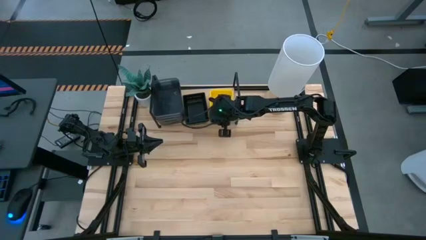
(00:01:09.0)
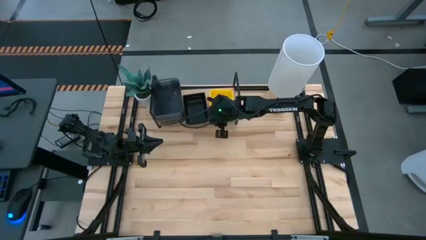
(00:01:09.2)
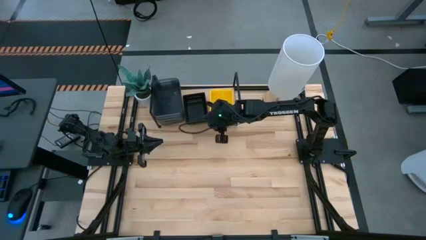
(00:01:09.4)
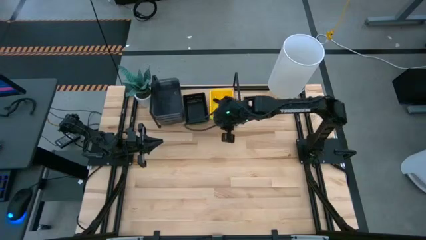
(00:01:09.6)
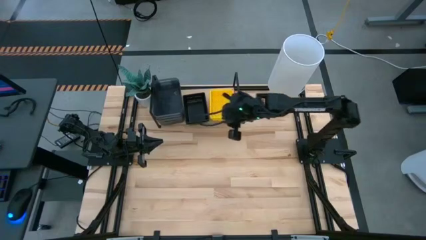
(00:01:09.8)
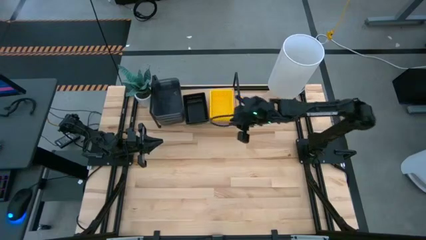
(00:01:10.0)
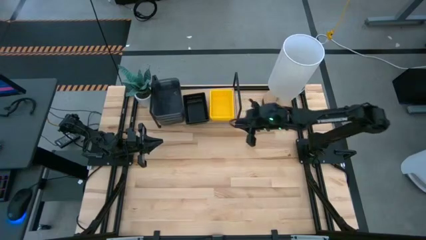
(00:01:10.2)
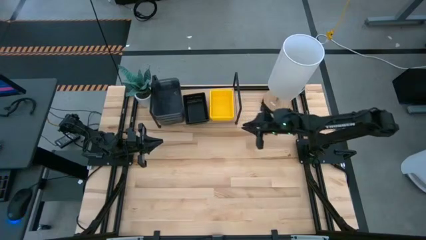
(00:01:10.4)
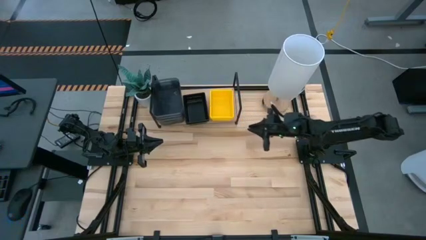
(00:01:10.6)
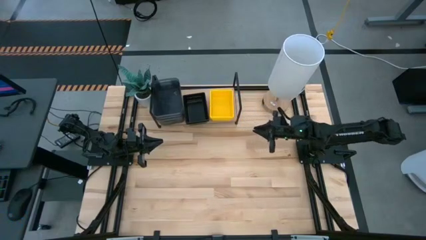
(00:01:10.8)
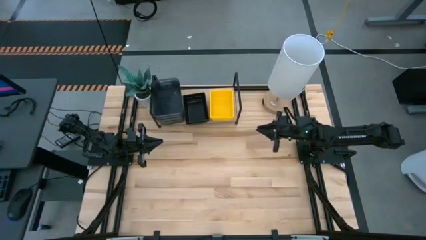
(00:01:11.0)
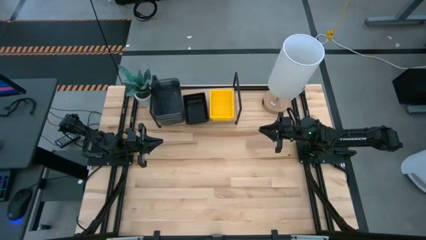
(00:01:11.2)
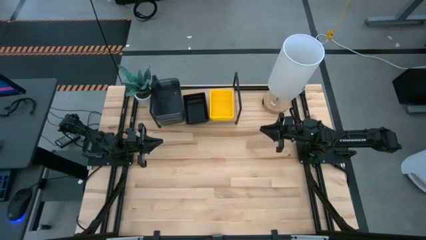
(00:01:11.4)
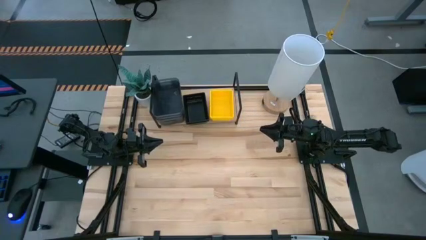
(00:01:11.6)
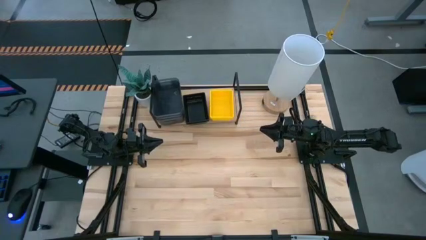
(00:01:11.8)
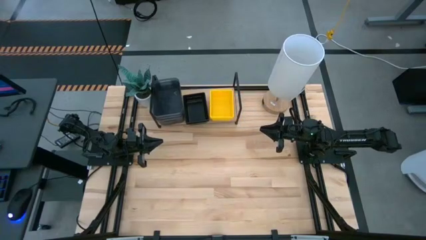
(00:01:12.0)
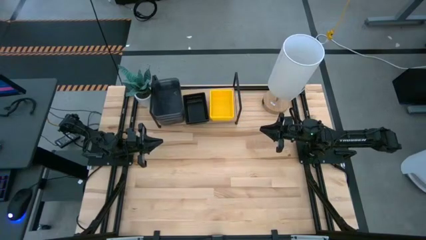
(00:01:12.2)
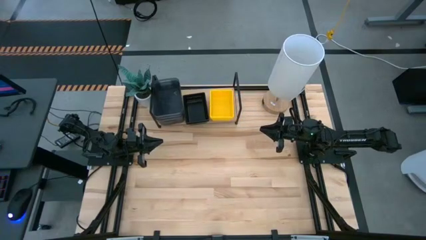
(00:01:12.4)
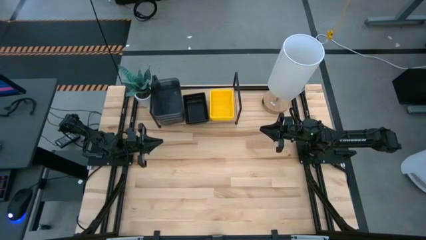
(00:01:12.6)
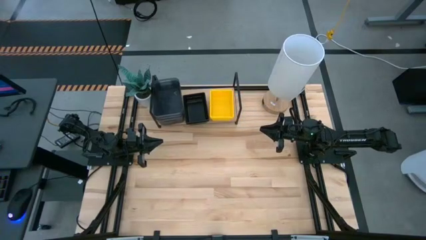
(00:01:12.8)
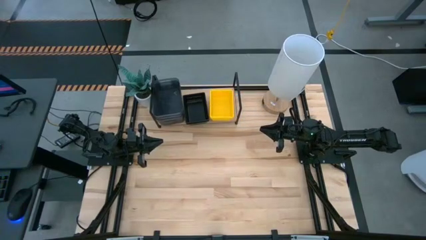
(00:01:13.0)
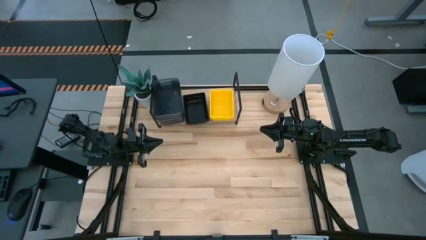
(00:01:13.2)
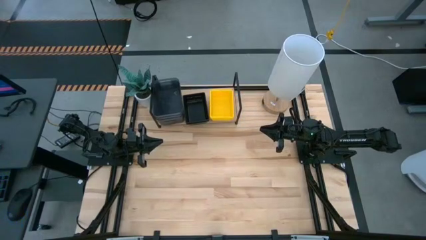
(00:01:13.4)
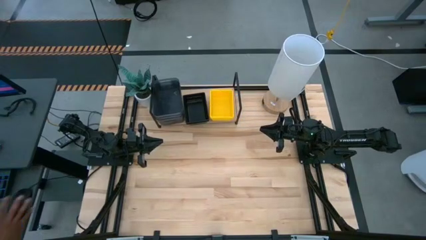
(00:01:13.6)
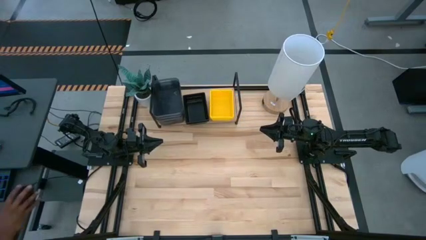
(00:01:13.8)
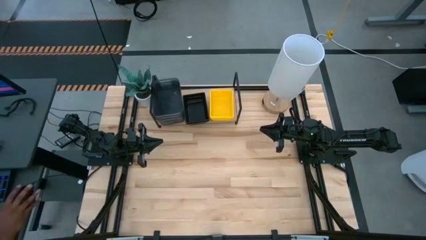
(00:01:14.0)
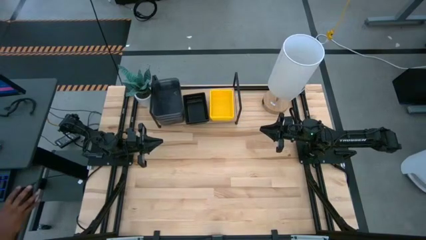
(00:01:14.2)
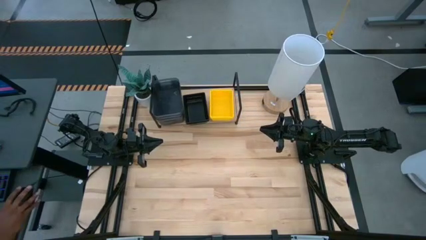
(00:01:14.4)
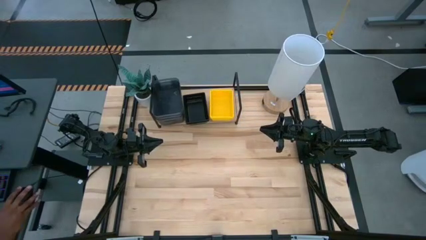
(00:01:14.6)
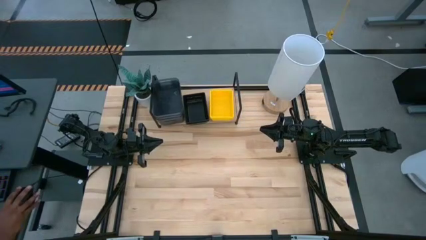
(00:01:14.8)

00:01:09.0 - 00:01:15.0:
Task: Stack baskets on shelf by color
Return to Home Position

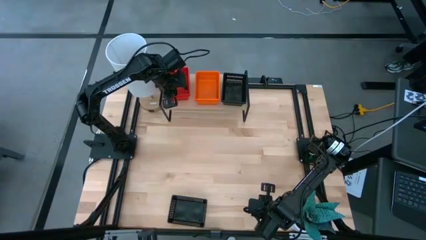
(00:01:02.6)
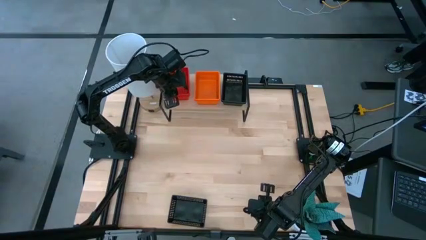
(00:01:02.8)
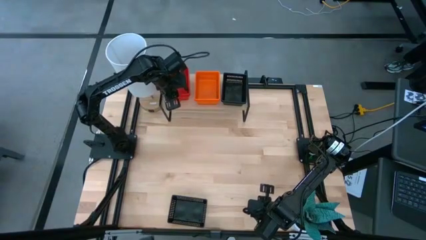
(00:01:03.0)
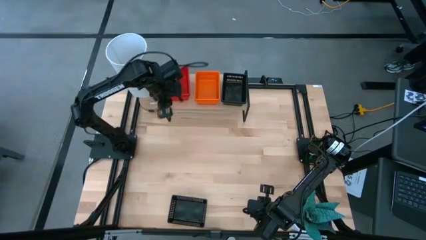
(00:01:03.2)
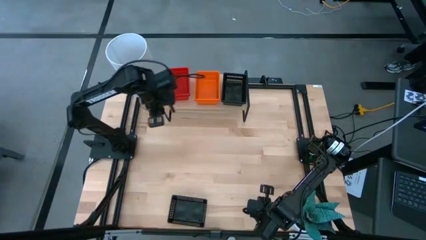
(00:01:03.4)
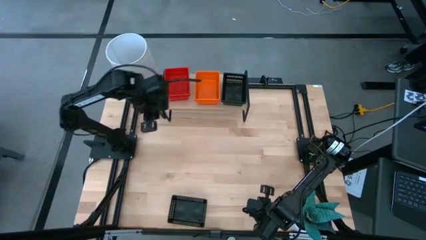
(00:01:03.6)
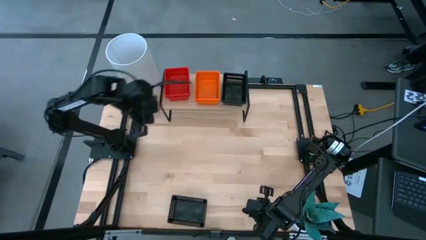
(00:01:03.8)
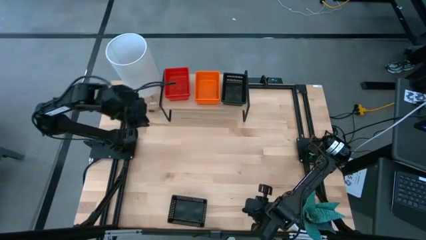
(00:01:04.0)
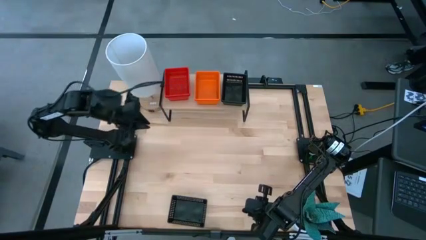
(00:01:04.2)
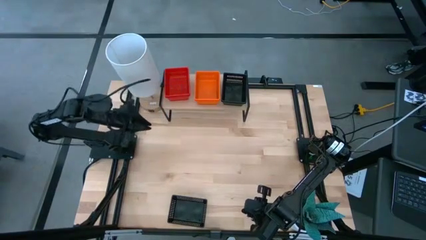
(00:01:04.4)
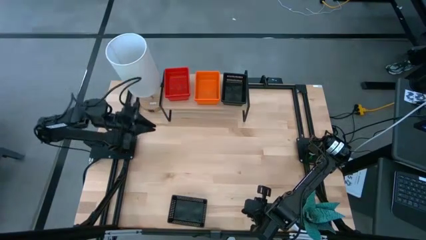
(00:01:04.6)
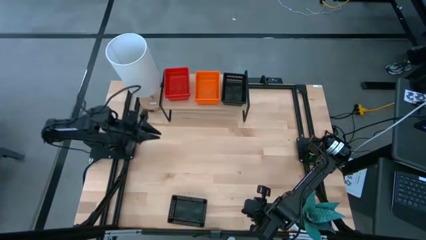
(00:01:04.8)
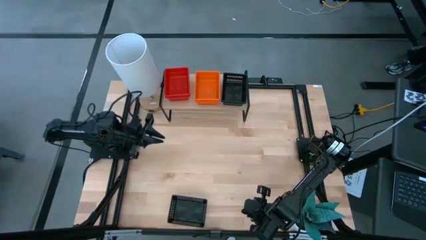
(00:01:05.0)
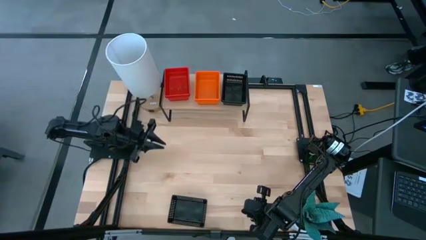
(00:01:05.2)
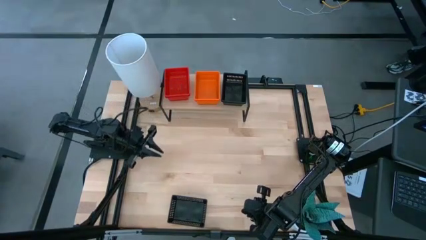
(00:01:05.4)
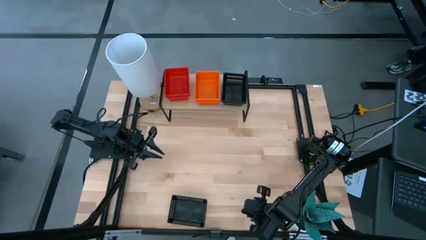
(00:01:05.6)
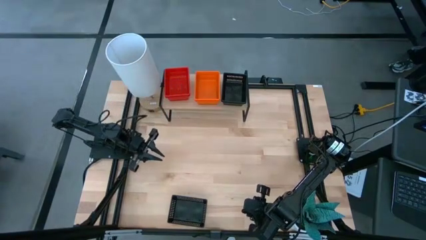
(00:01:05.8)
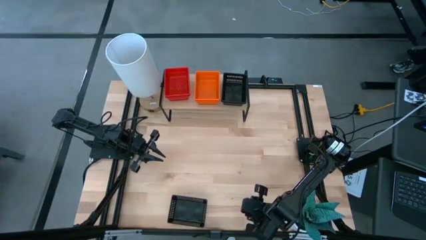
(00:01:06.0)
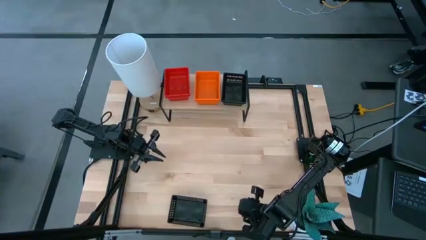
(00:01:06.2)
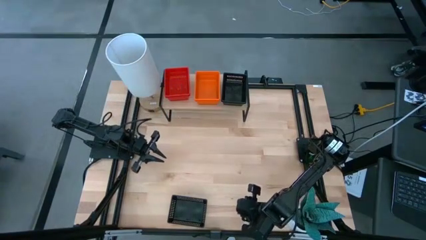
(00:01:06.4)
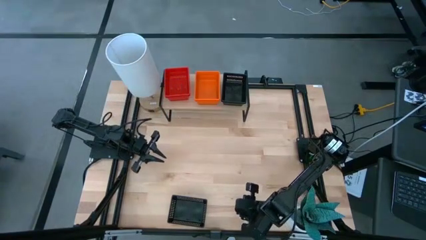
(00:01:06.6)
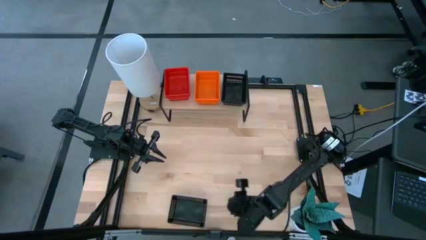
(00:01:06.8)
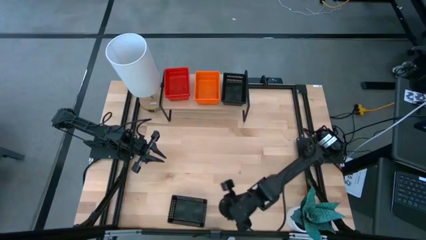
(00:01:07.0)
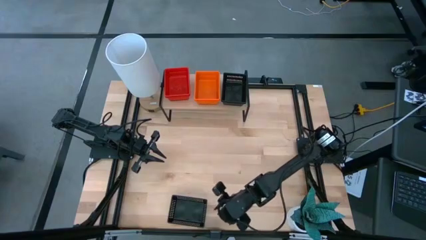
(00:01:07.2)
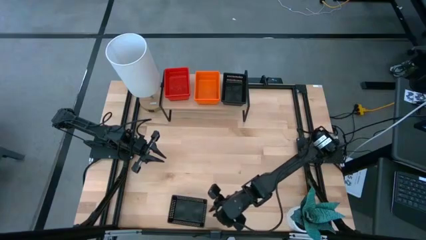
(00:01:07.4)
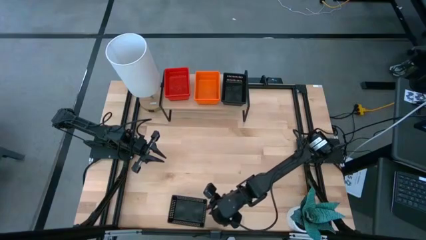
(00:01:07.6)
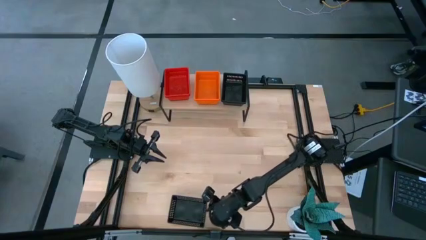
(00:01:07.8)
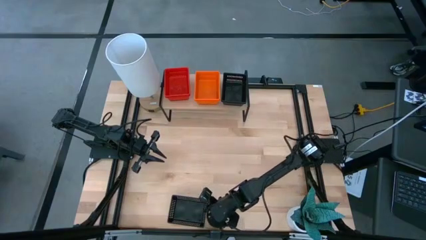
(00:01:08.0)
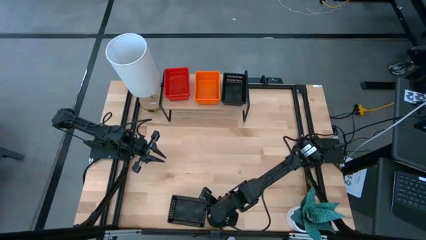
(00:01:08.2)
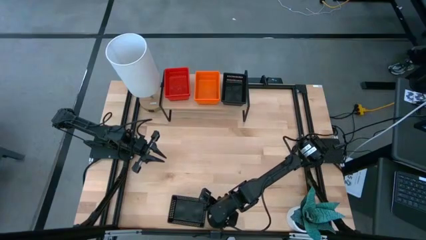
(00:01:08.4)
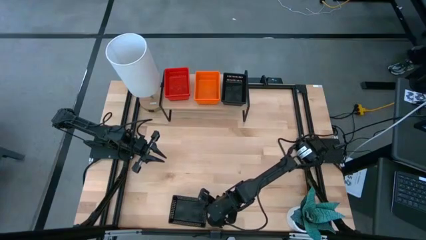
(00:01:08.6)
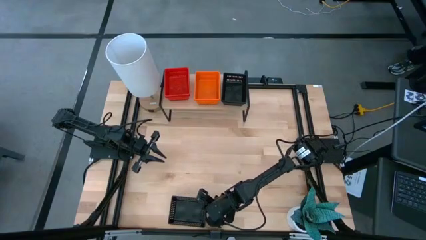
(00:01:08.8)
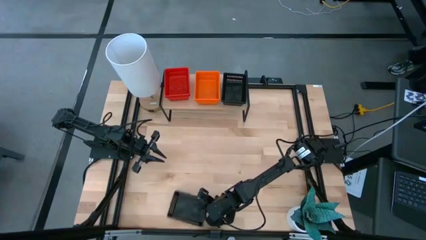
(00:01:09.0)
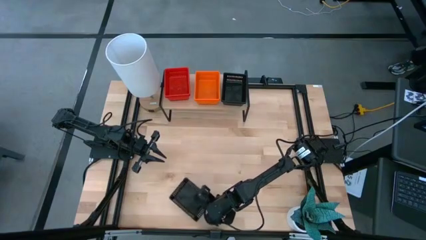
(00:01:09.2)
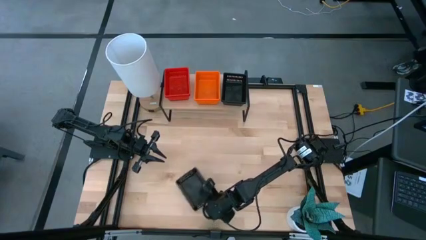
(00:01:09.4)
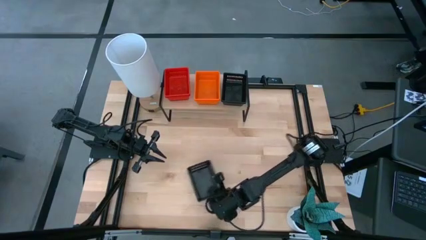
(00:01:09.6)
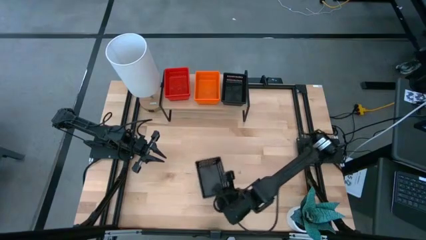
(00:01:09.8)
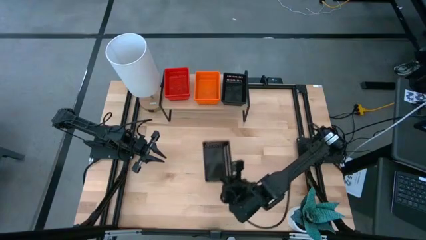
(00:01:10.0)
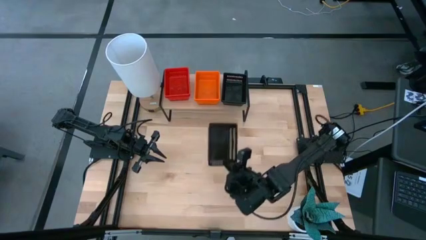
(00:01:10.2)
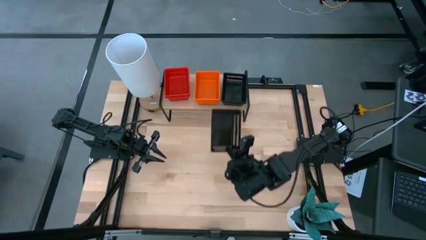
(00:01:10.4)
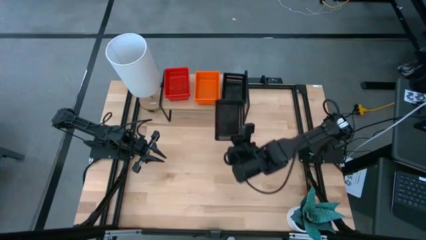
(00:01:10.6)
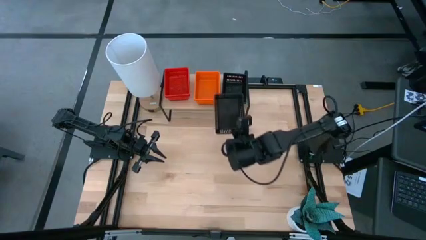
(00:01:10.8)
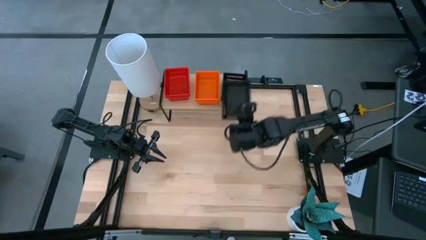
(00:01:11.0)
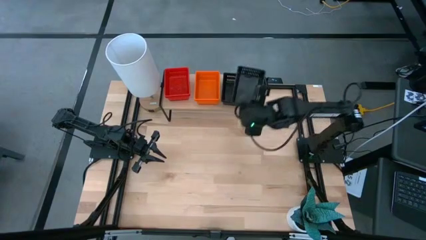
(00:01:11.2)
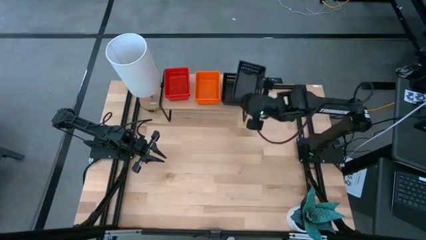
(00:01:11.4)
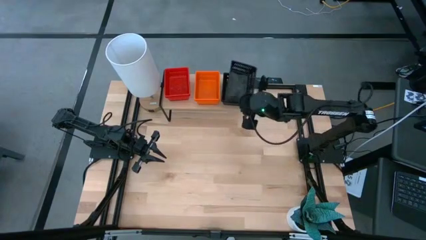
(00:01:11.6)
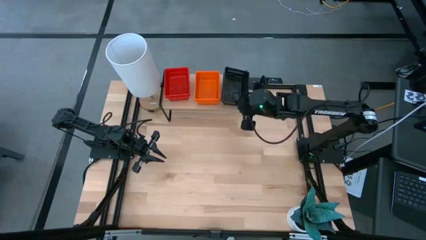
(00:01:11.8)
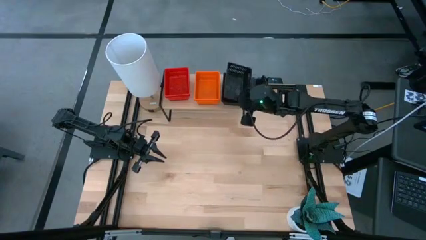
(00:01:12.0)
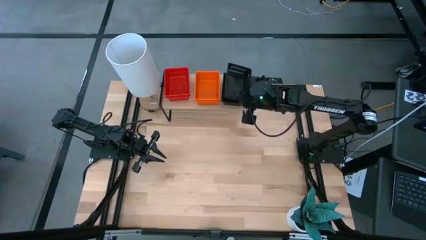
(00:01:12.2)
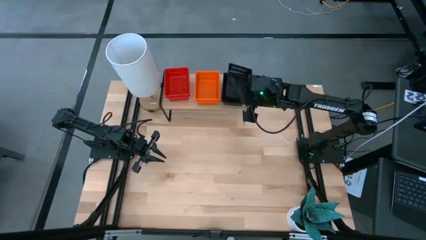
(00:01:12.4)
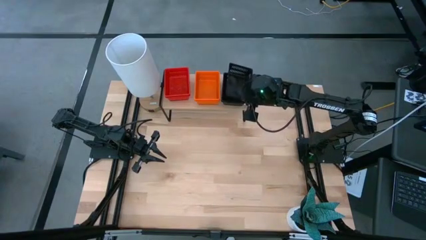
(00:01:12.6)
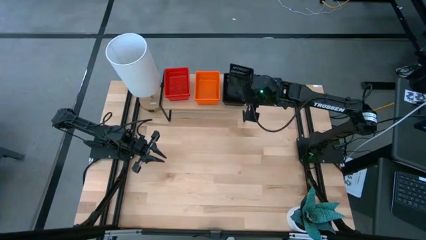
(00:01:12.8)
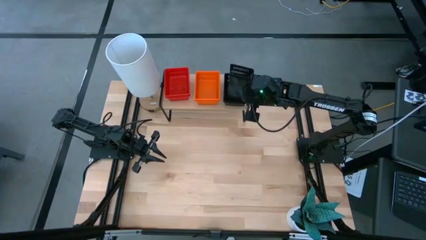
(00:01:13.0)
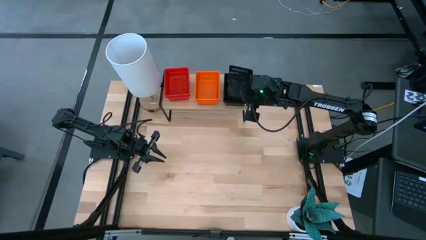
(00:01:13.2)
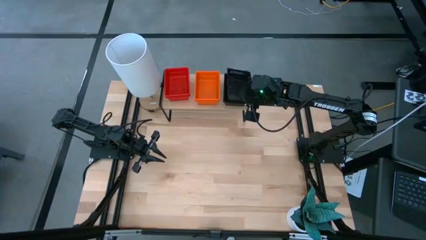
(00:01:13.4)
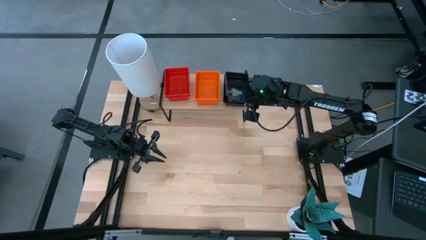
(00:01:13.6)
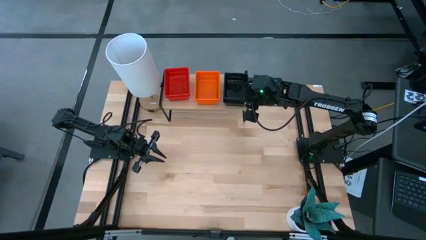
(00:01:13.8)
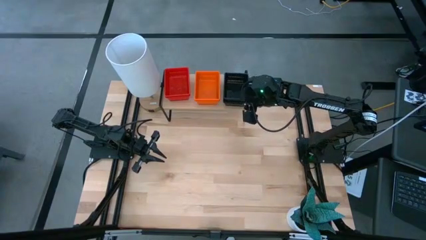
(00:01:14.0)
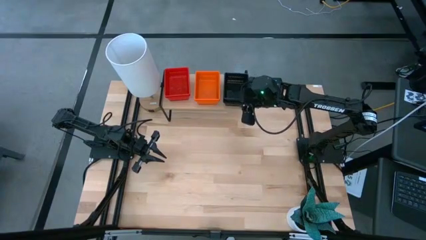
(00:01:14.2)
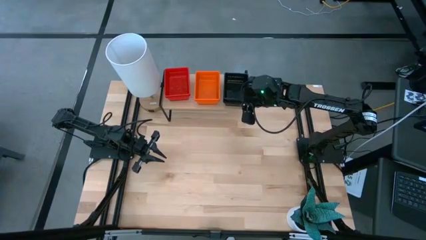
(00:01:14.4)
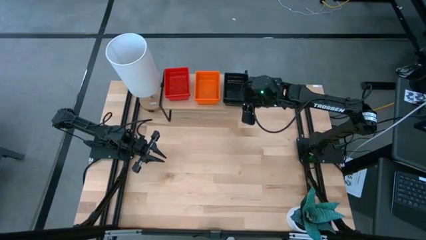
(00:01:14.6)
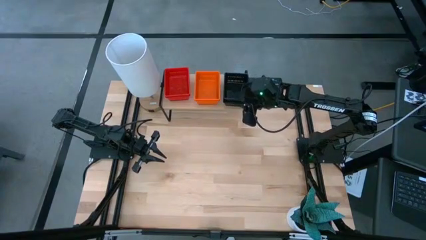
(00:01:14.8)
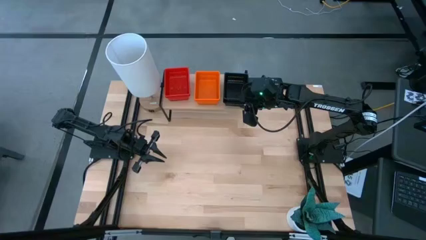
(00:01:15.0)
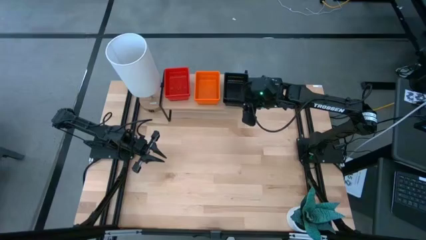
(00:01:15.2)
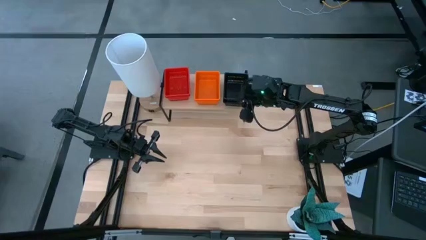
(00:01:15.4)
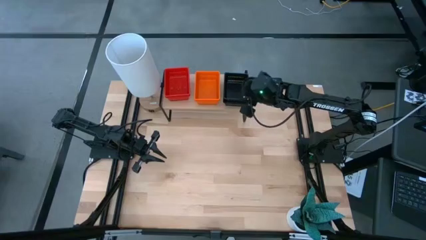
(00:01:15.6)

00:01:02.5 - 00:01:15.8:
Task: Stack baskets on shelf by color
Stack the black bin on the black bin on the shelf
